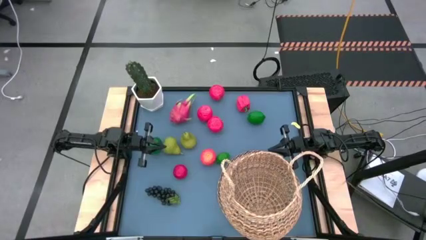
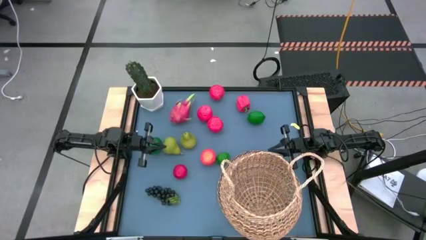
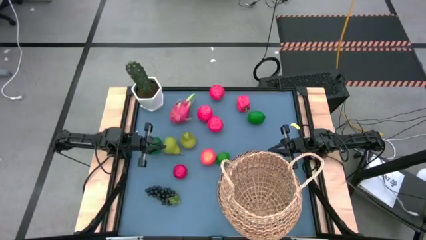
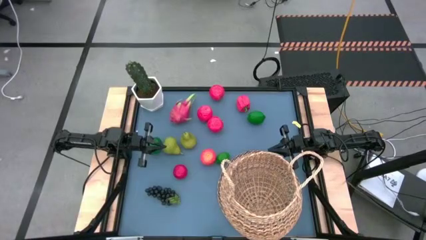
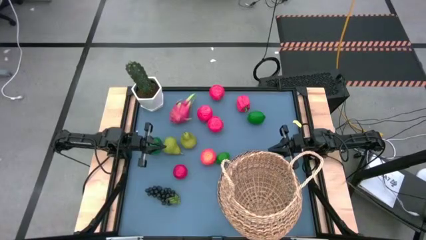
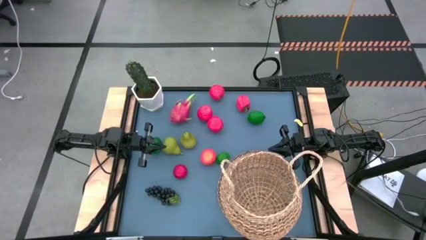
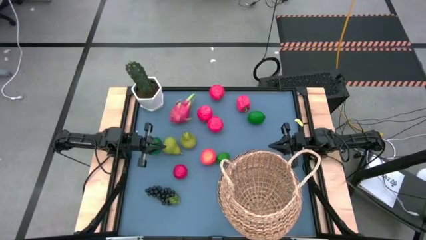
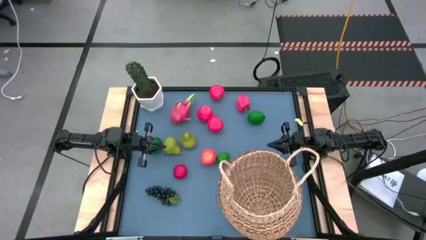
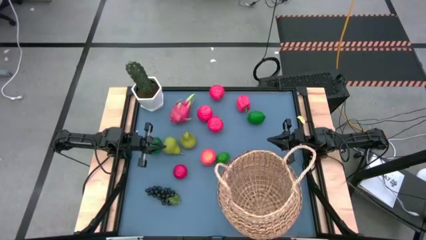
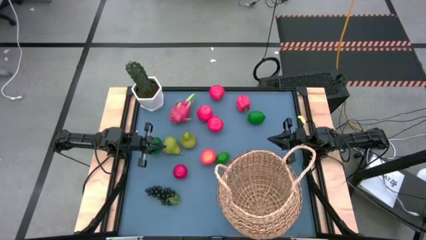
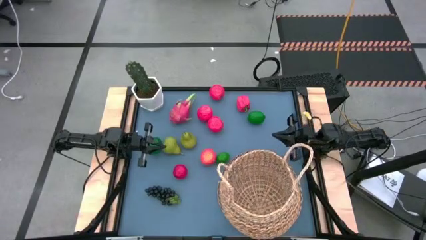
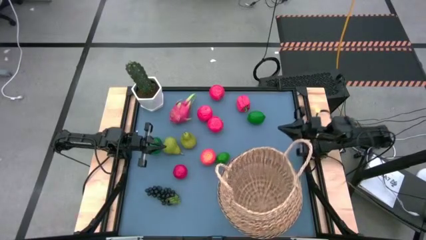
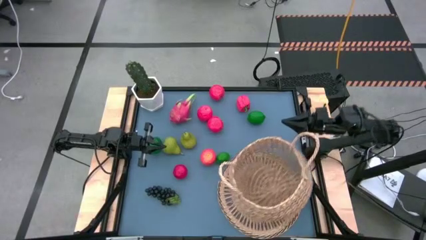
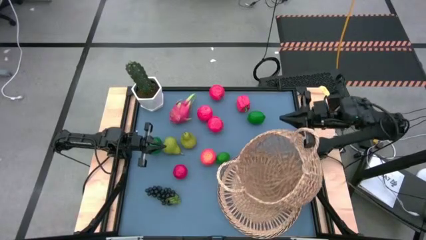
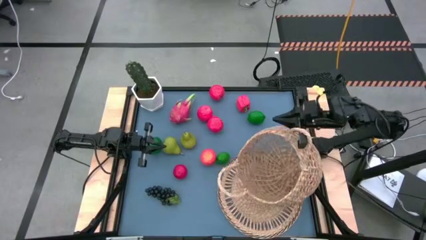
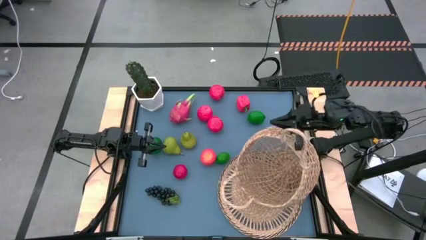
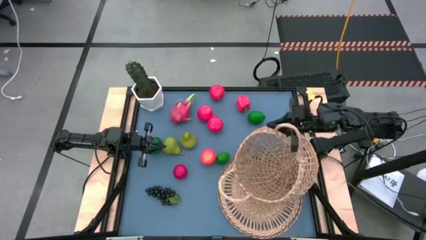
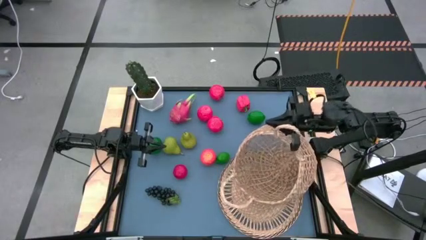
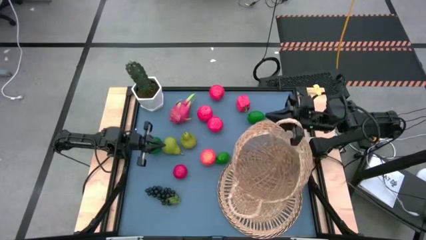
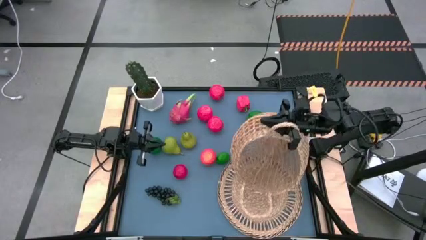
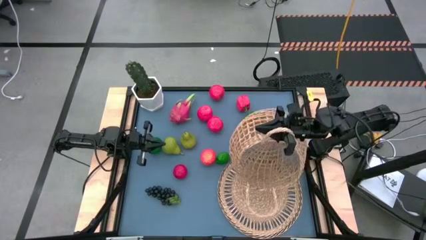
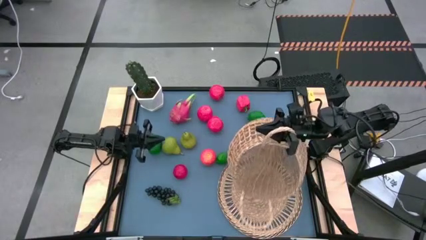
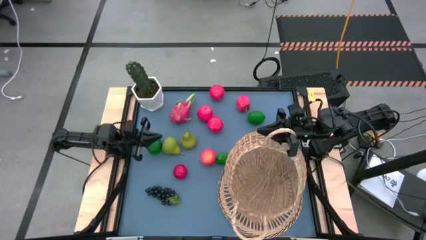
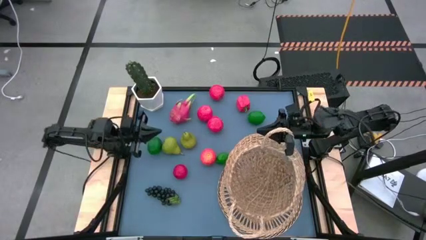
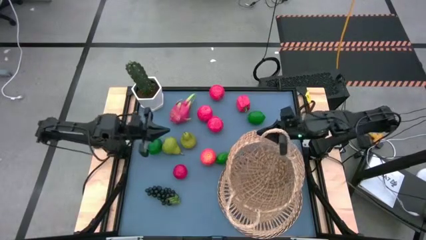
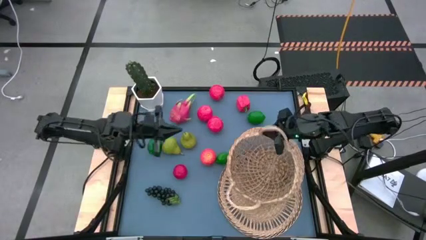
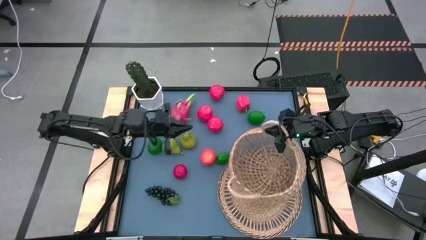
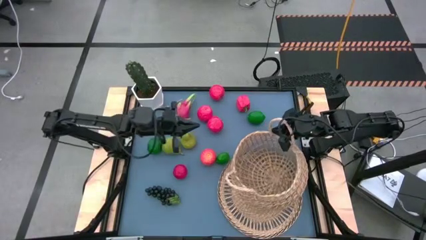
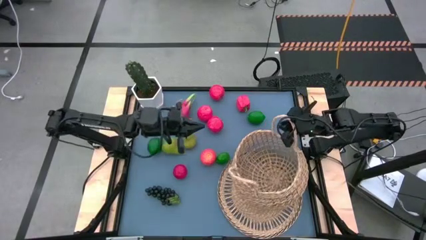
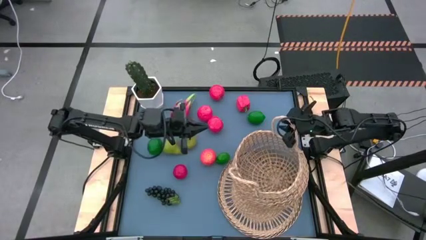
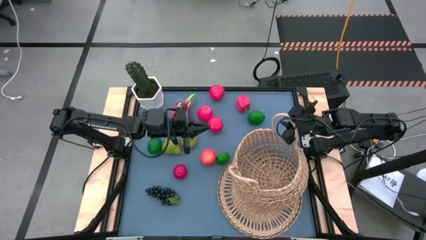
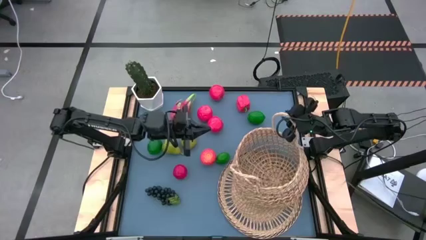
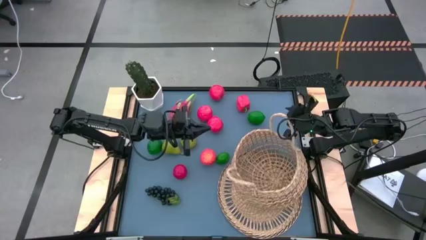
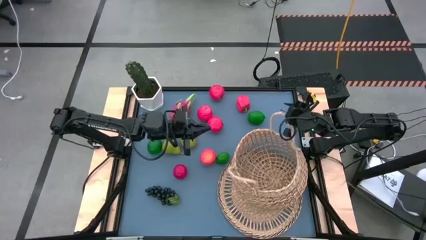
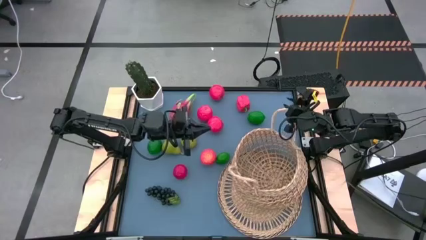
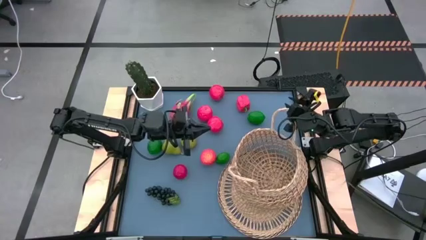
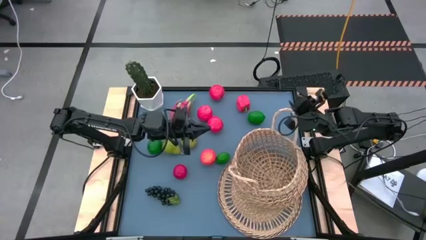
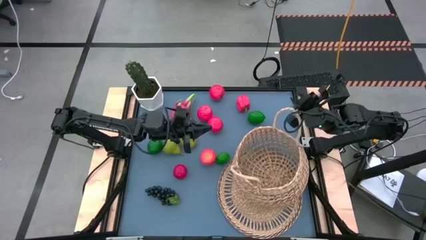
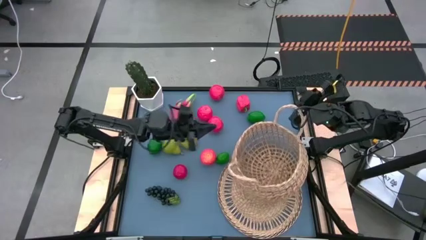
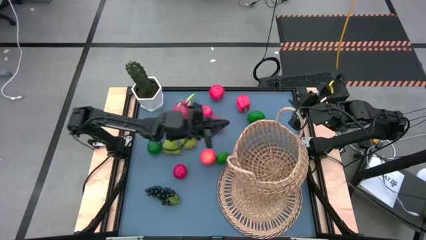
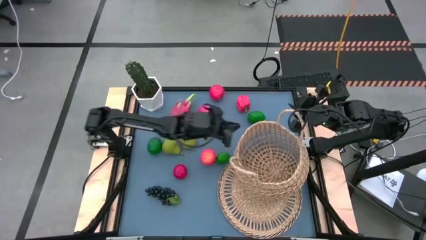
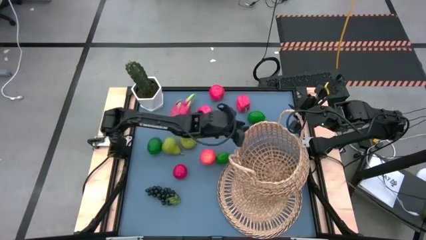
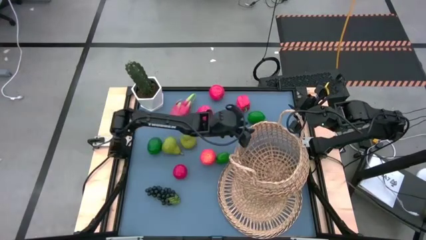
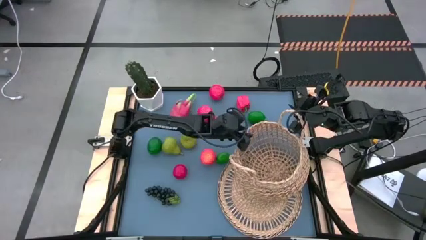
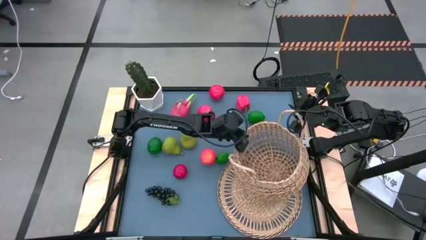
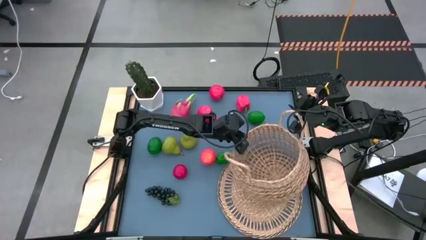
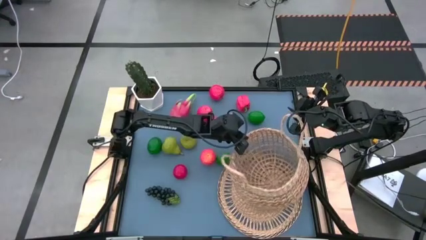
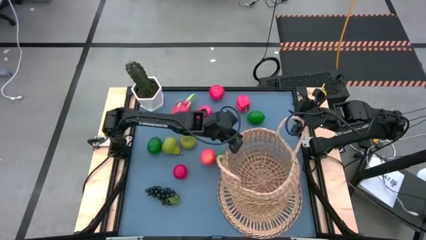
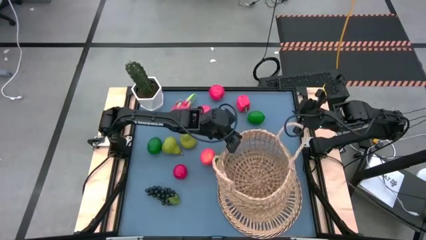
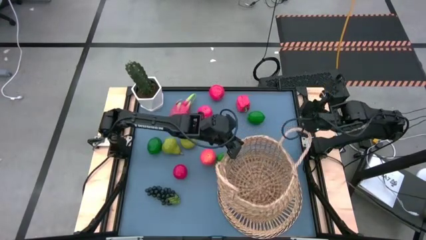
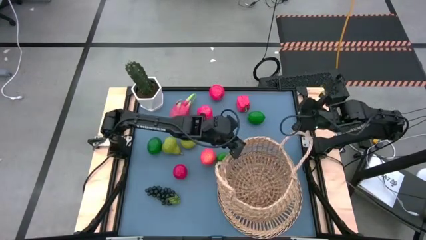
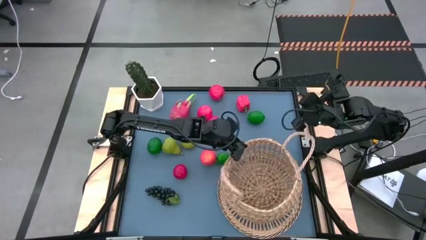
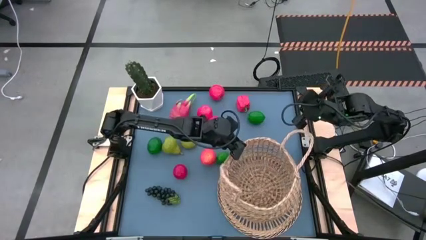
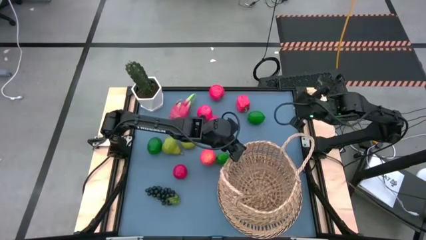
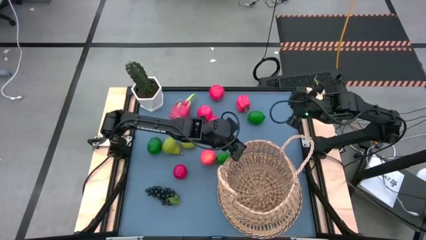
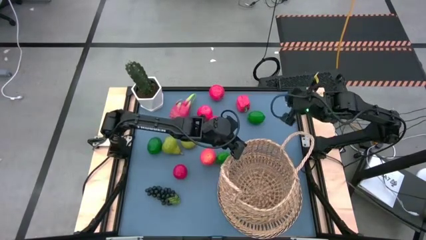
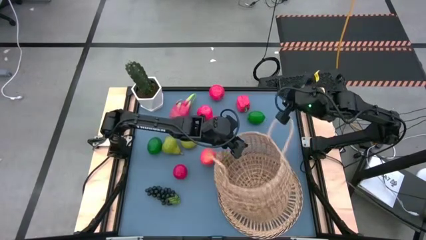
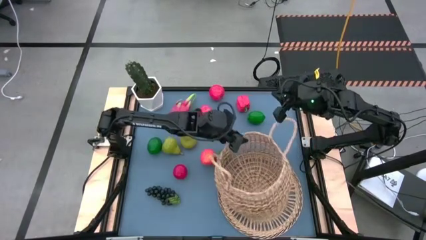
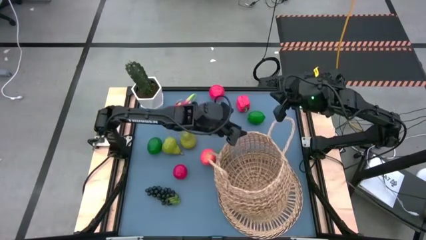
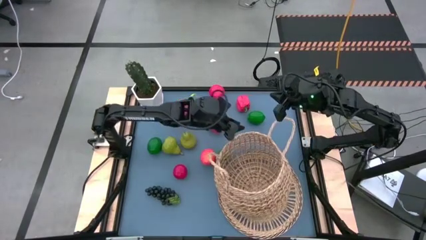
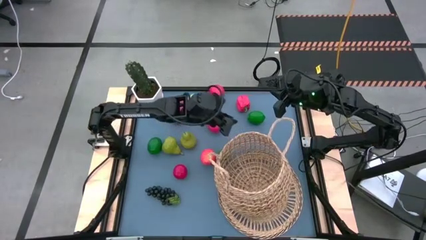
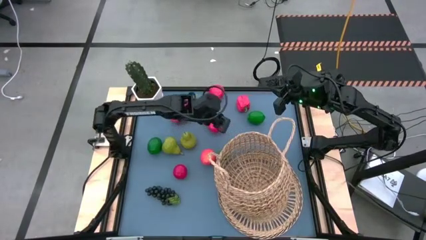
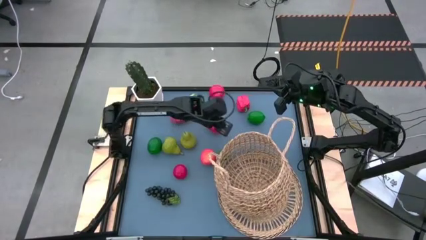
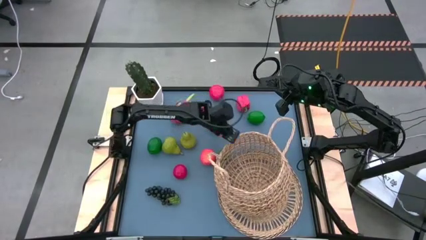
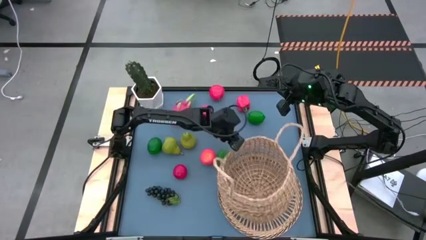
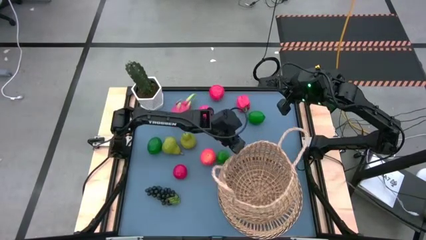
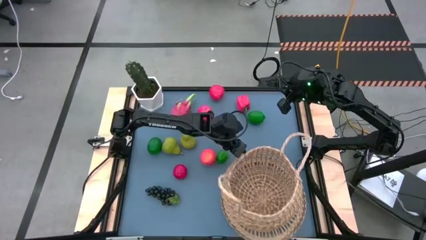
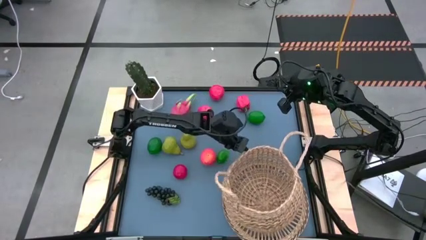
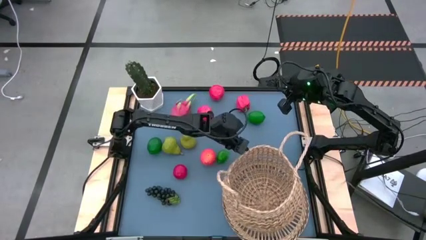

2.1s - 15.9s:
Task: Build produce basket
Adjust the brown basket on the brown placemat

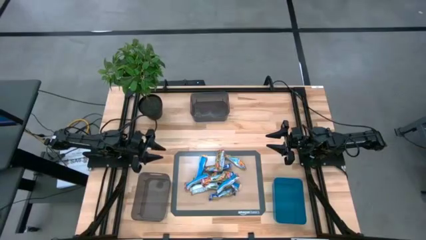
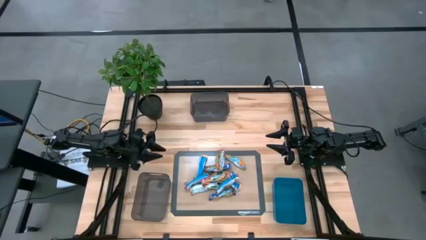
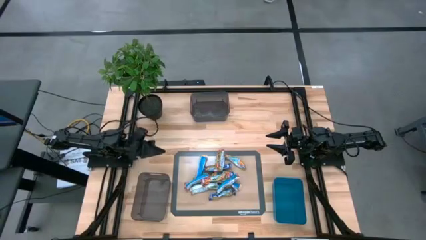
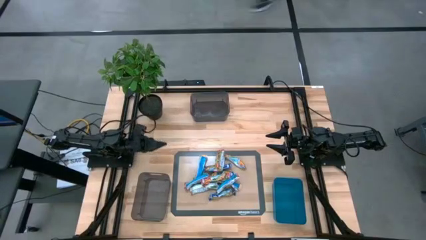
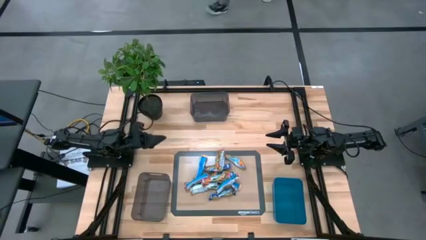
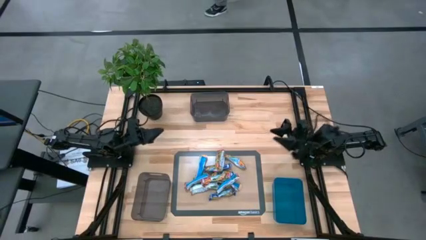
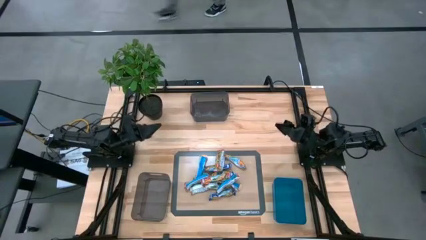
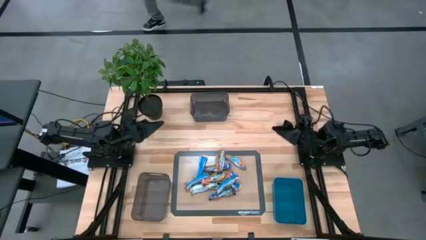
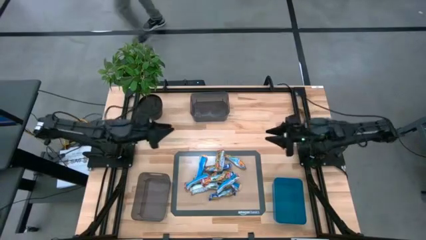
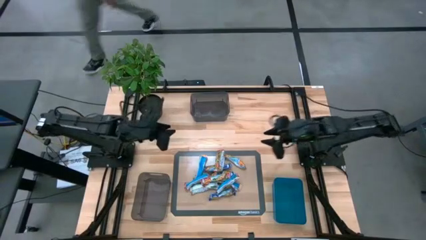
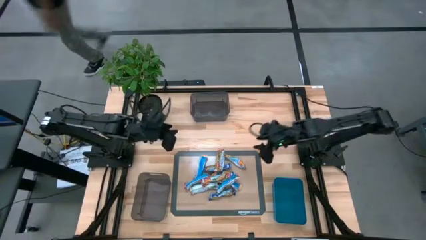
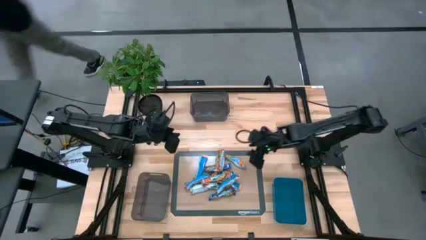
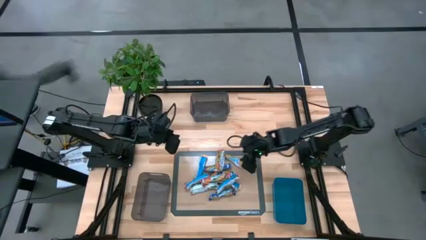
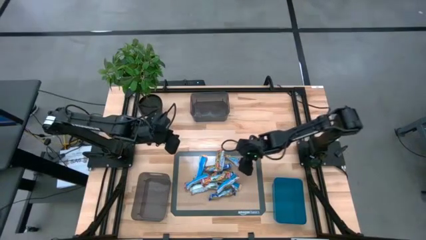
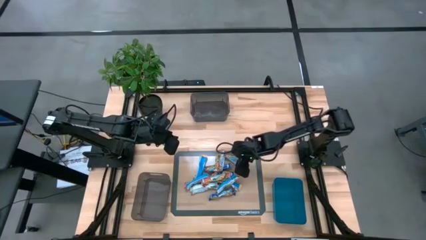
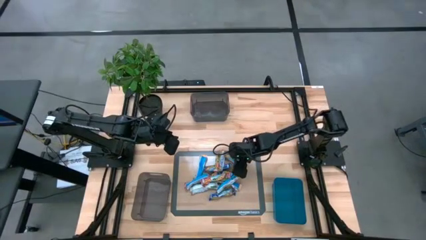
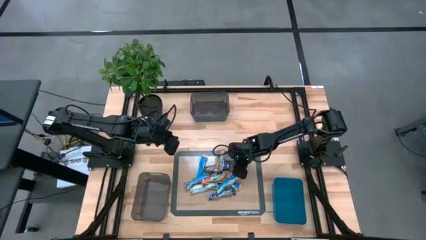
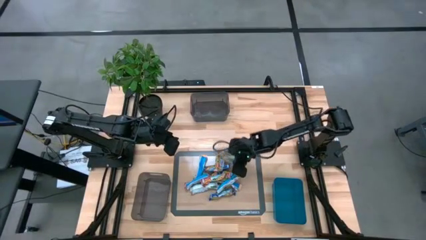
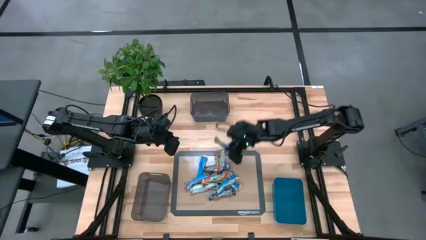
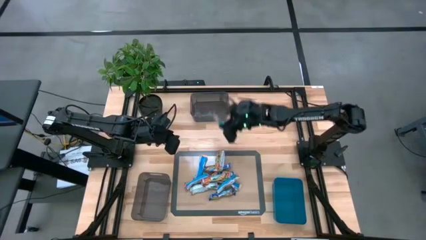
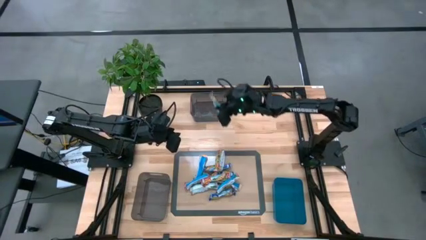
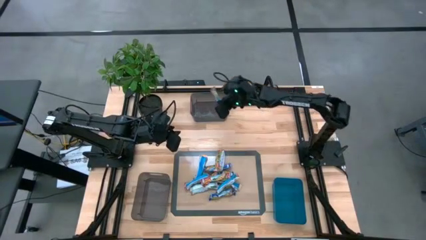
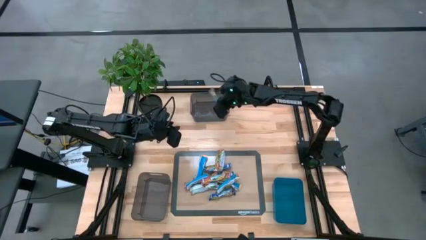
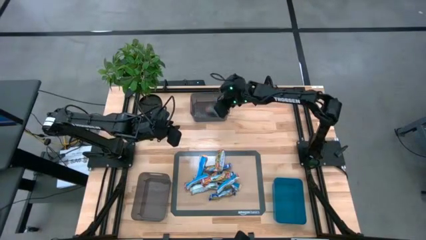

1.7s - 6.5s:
Task: Pick and place Granola Bars by type
Put the yellow granola bar into the top black transparent bin
